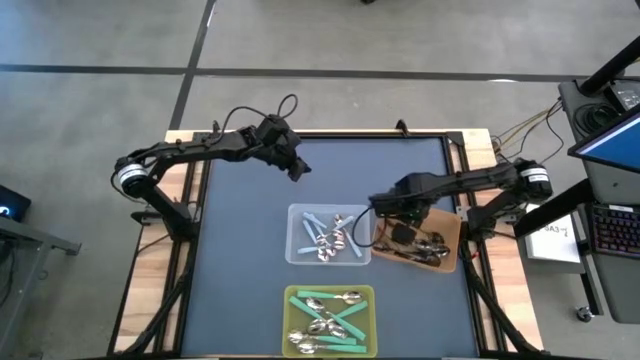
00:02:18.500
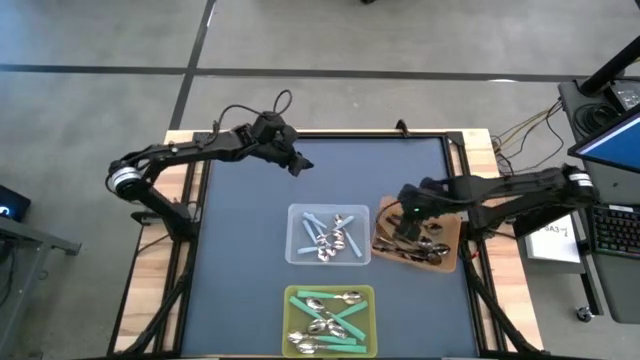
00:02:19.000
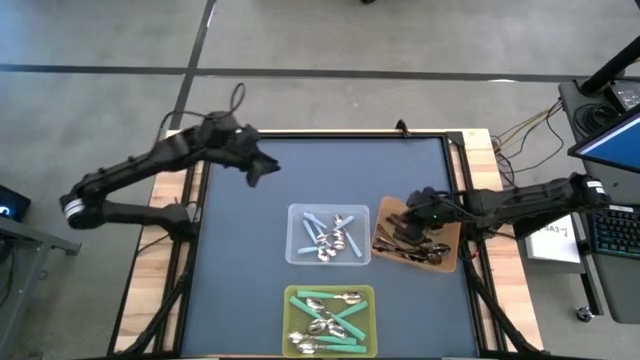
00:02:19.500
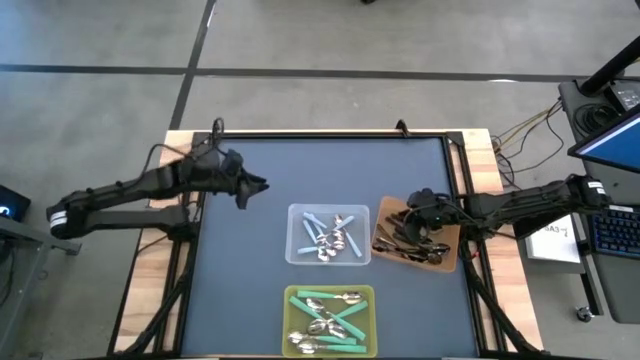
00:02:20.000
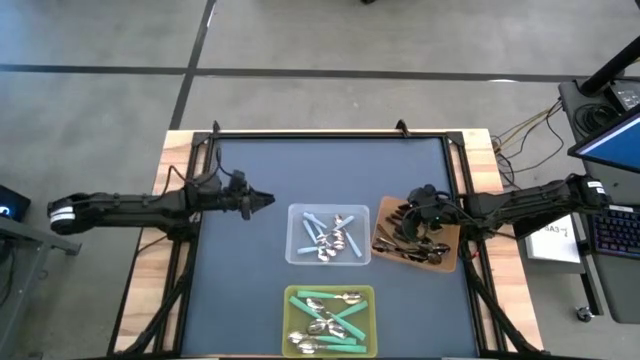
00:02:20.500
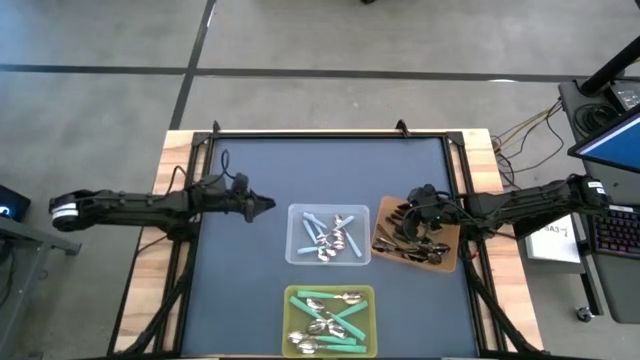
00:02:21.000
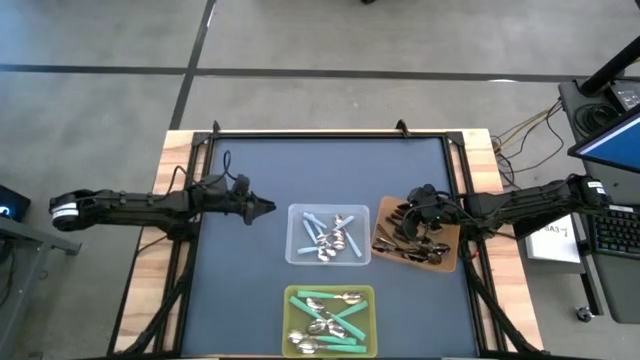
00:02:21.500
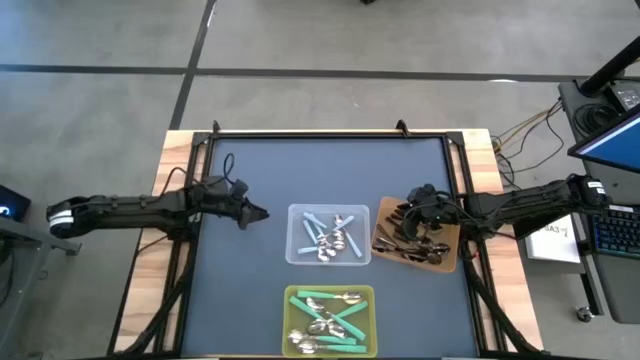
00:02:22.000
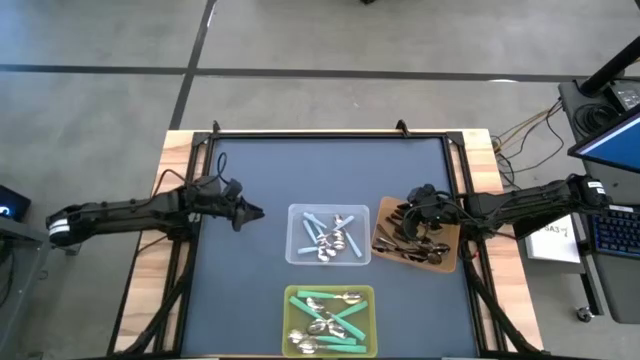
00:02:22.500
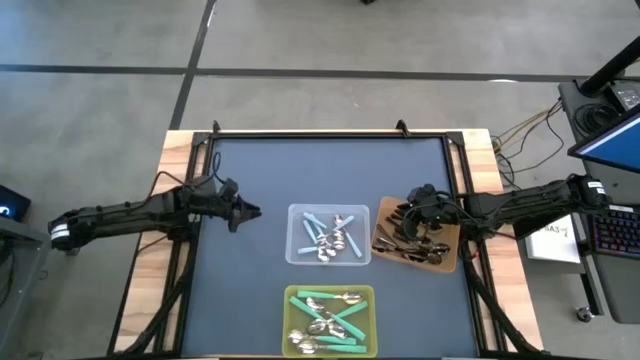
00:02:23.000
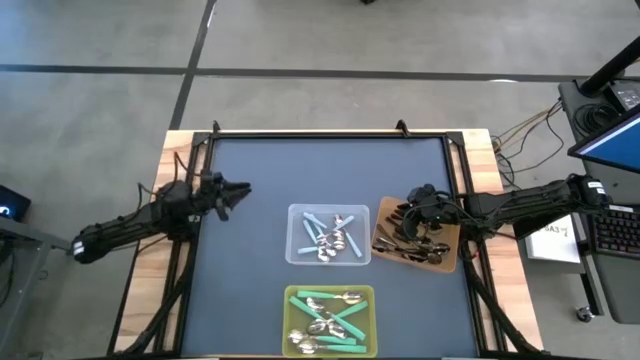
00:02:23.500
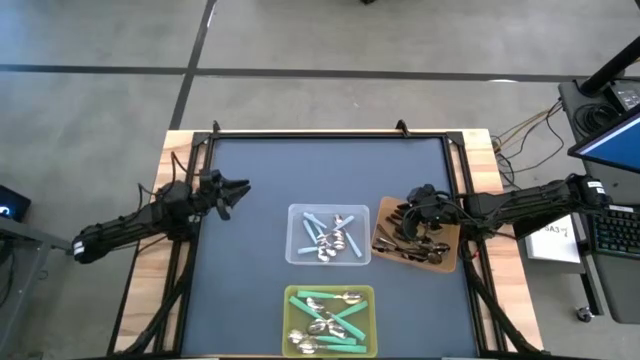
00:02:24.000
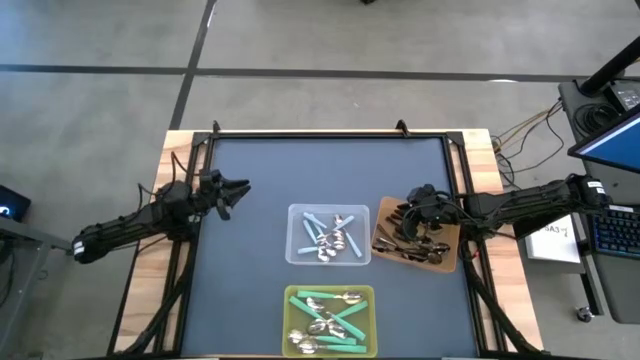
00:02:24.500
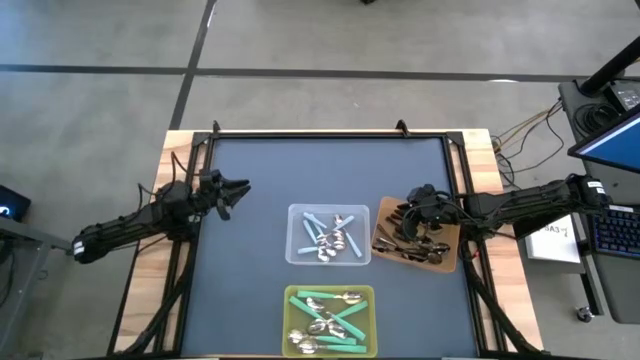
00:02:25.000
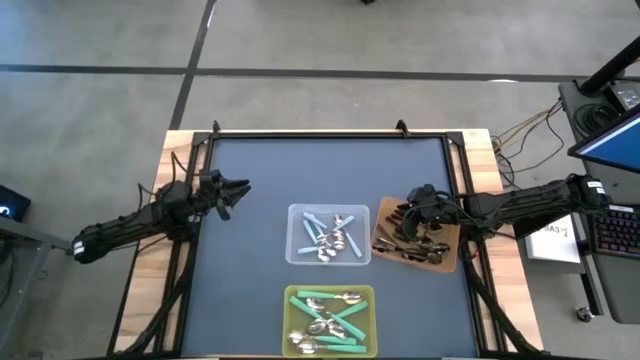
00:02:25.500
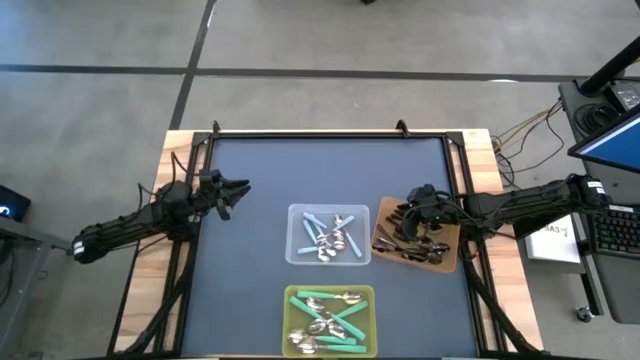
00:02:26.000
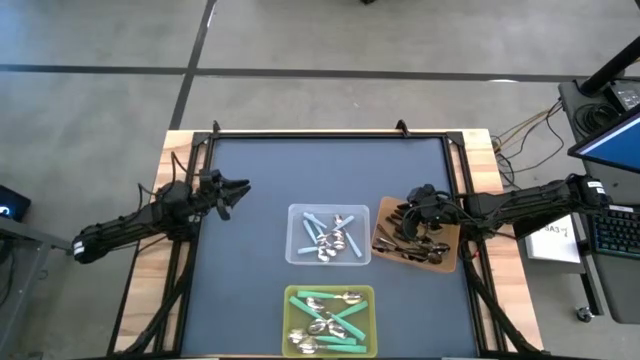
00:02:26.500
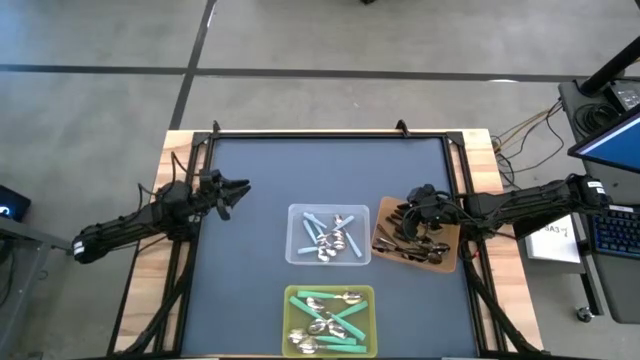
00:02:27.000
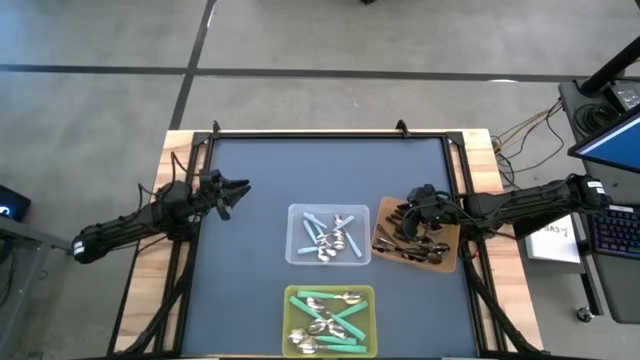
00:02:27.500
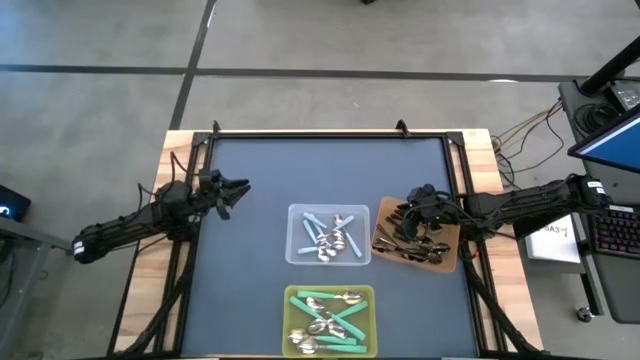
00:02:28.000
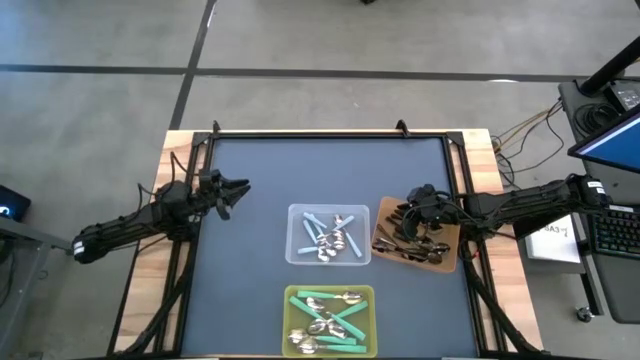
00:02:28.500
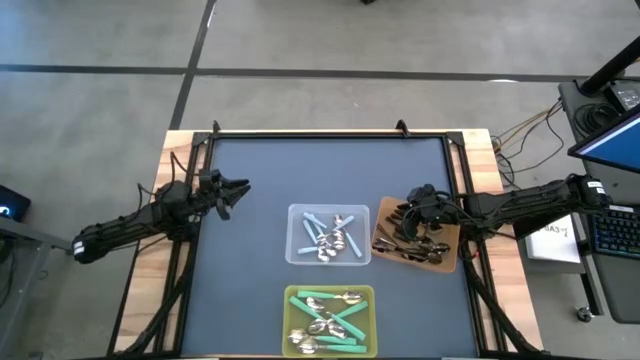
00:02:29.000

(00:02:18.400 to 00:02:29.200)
Task: Sort silverware by color (type)
Return to Home Position

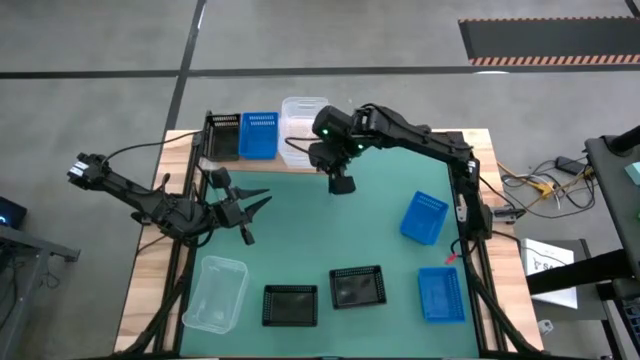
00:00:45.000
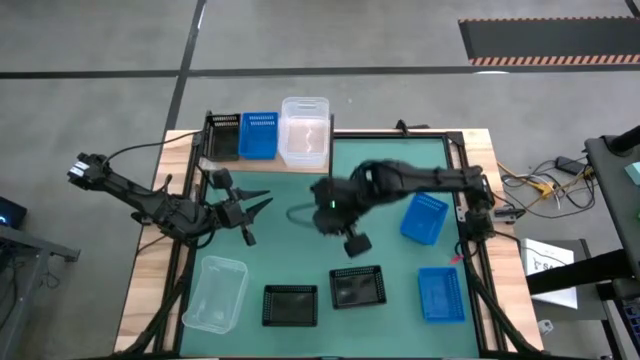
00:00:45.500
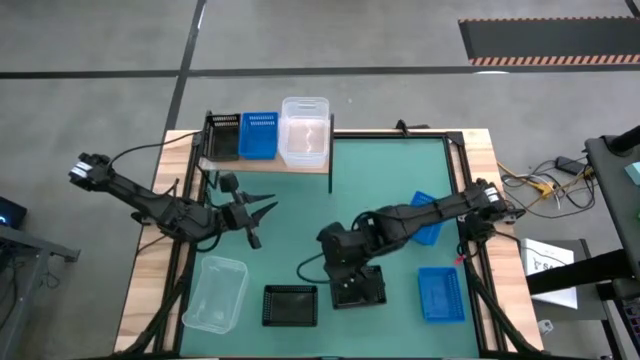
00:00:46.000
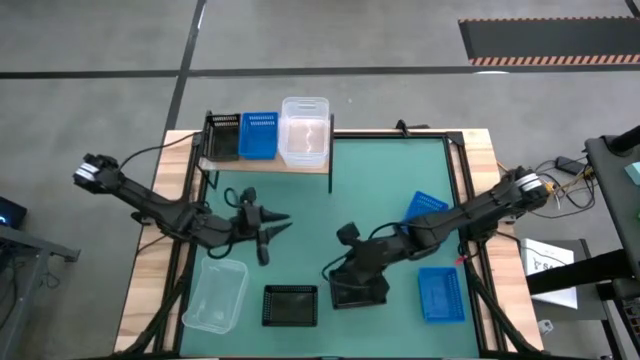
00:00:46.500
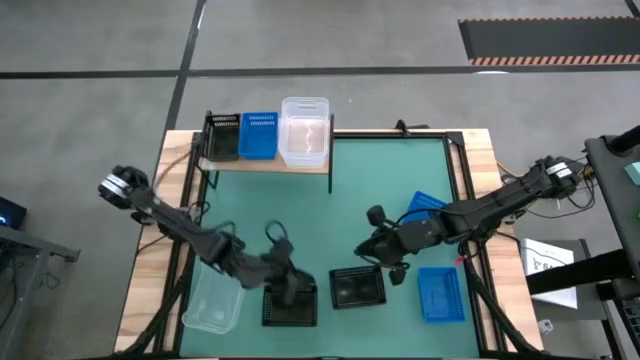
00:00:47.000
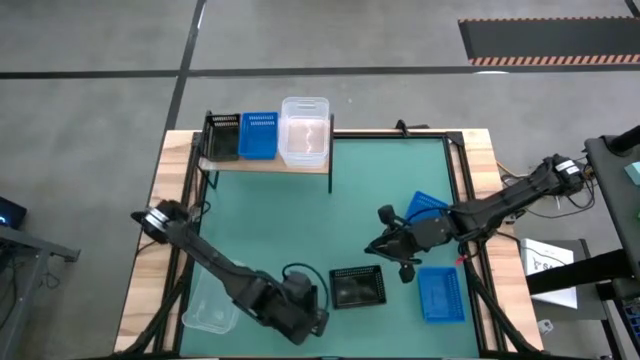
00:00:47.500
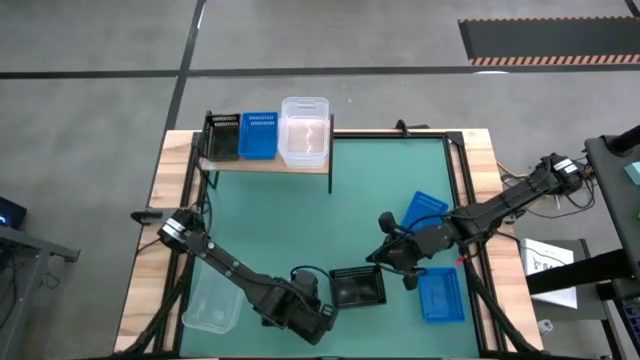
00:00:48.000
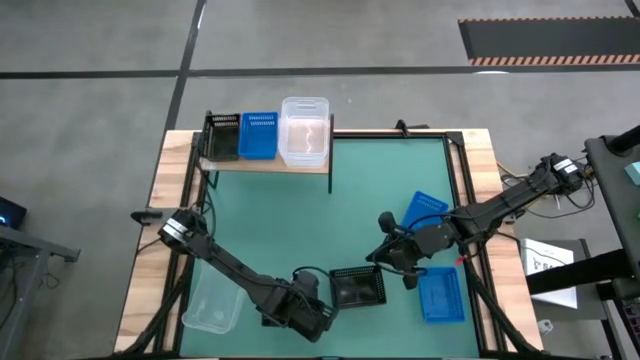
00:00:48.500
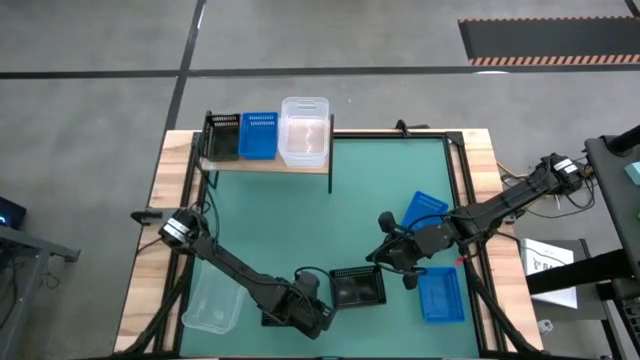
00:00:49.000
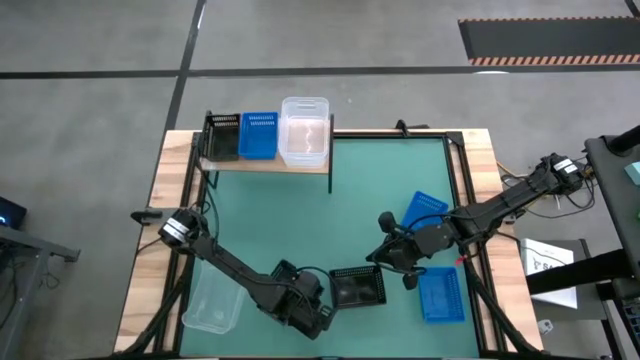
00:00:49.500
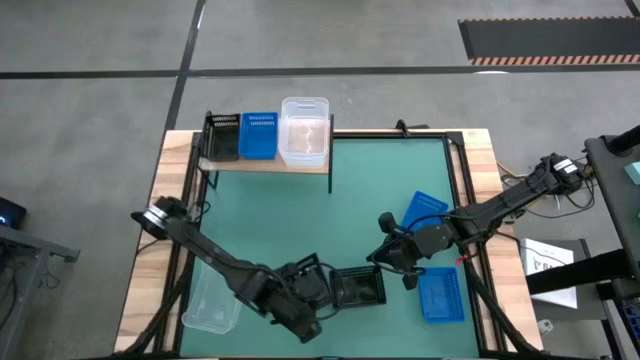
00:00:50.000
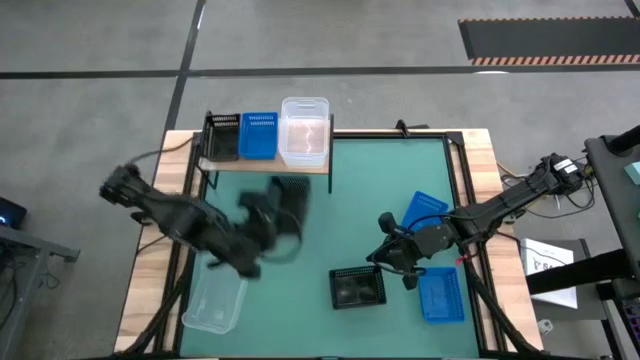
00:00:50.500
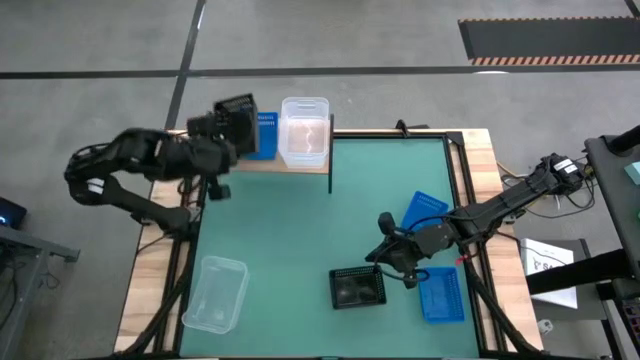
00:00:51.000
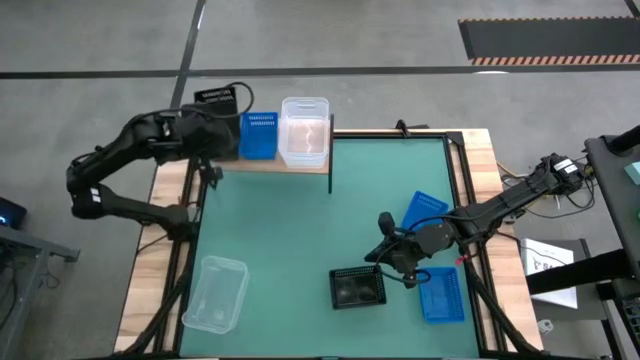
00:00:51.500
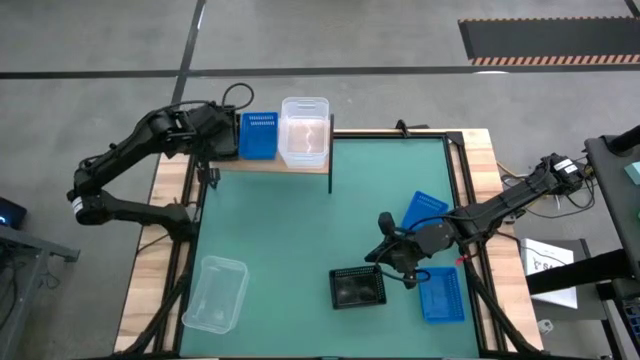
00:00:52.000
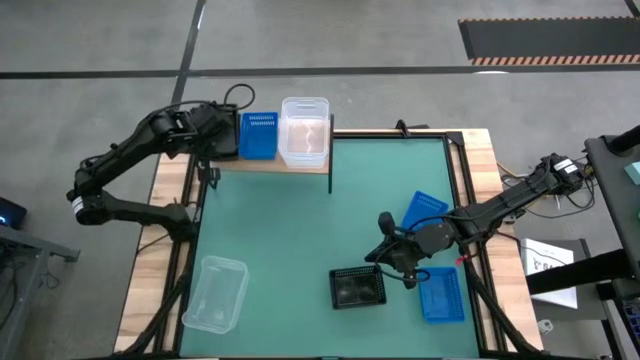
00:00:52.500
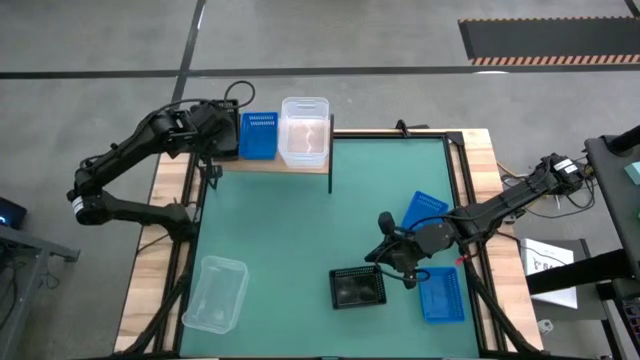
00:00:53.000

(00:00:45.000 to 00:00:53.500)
Task: Stack baskets on shelf by color
Stack the left black bin on top of the black bin on the shelf

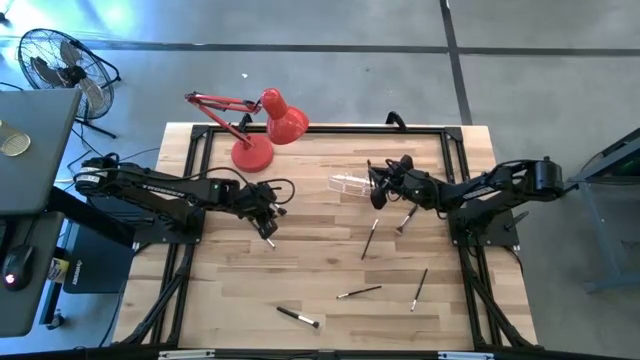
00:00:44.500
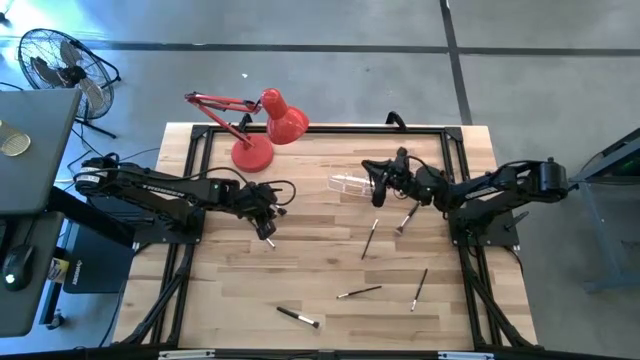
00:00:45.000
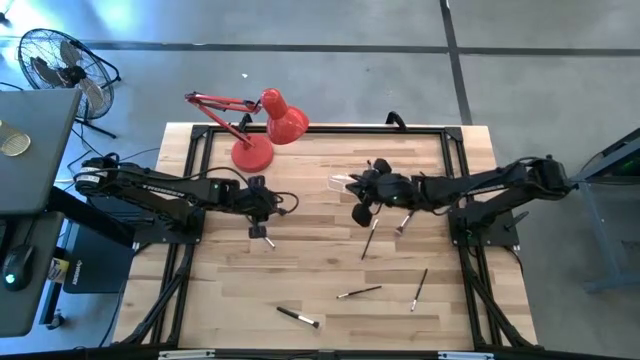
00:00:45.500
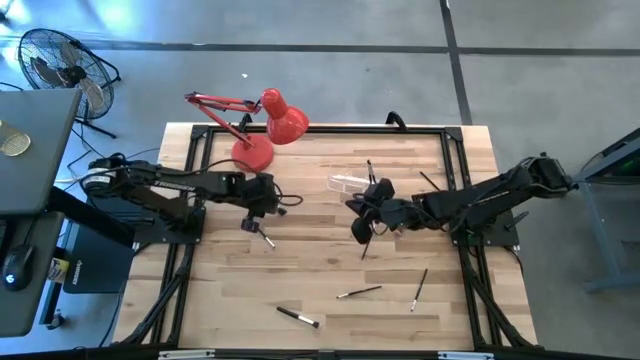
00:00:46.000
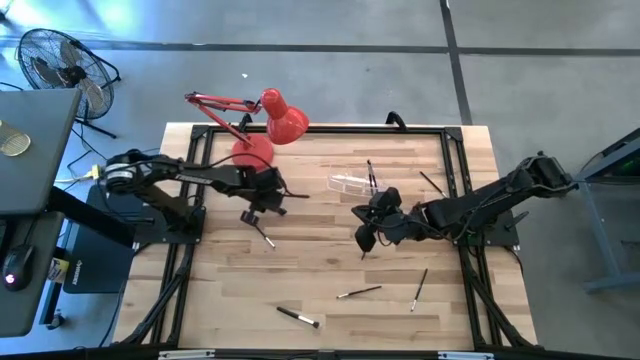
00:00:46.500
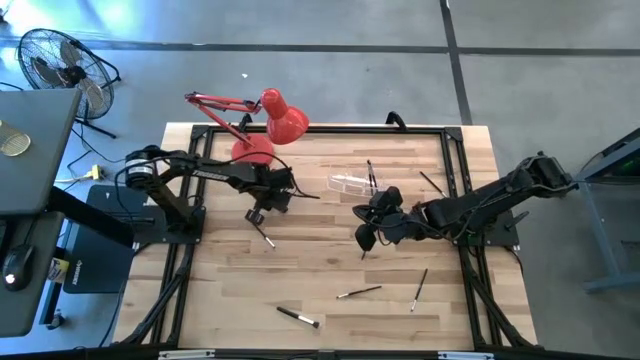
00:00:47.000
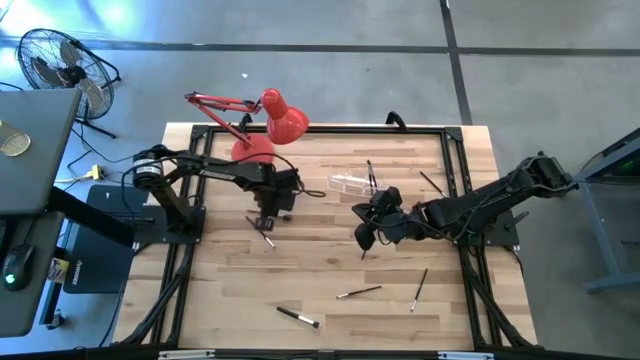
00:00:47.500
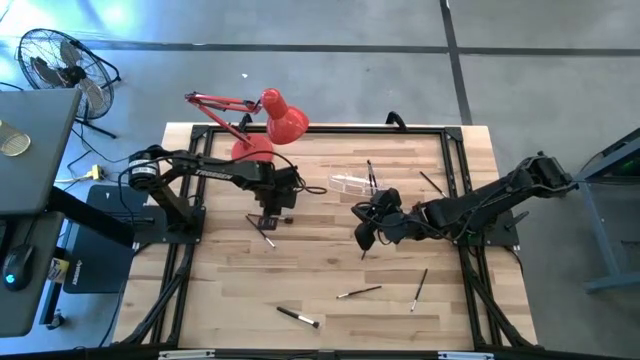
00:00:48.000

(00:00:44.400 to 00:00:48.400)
Task: Put items in baskets/containers
Put the brow brush into the transparent organizer
